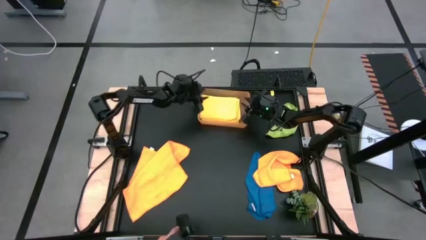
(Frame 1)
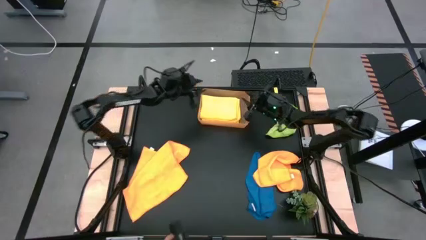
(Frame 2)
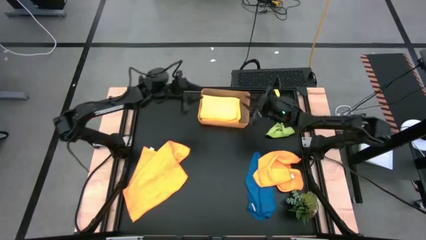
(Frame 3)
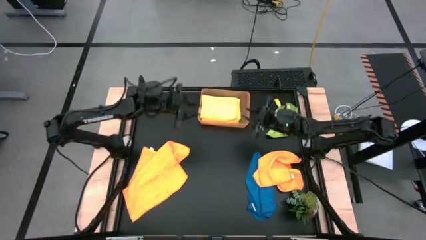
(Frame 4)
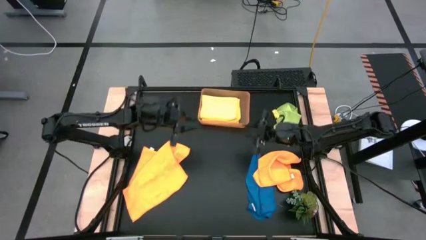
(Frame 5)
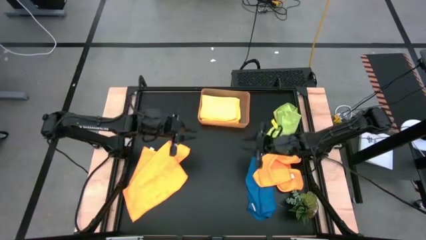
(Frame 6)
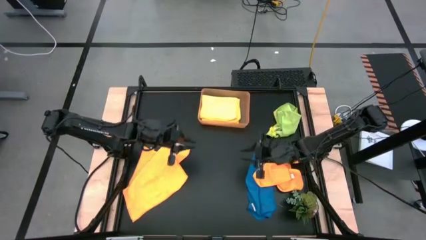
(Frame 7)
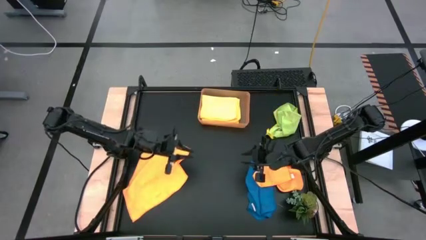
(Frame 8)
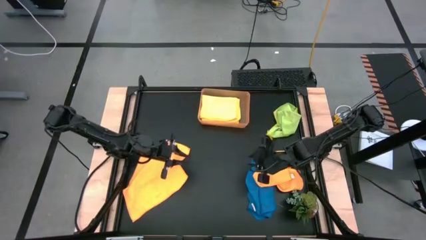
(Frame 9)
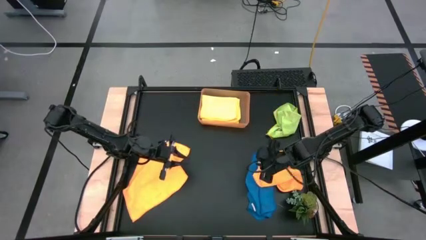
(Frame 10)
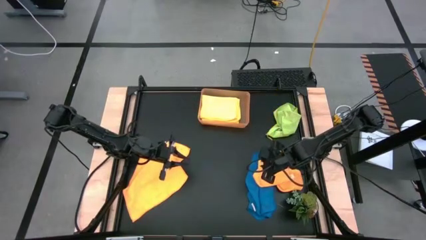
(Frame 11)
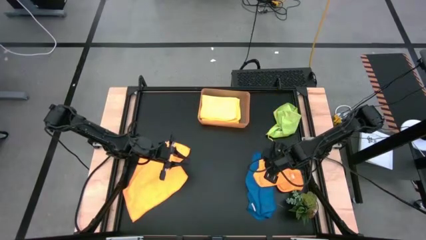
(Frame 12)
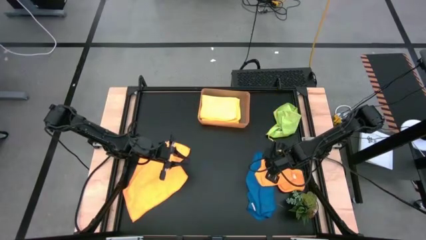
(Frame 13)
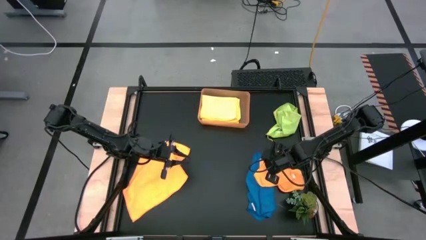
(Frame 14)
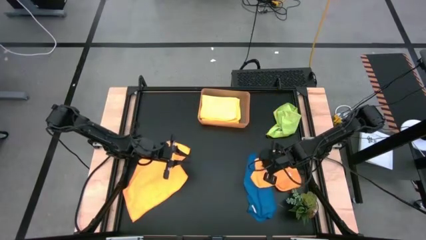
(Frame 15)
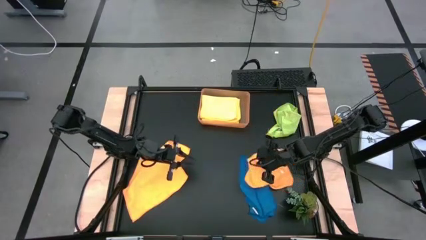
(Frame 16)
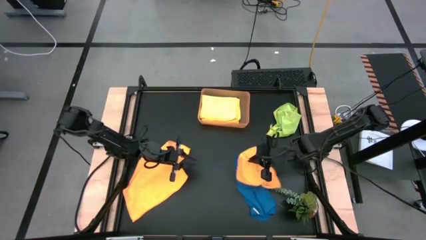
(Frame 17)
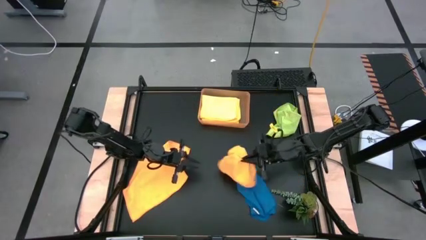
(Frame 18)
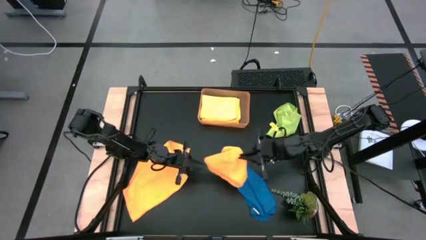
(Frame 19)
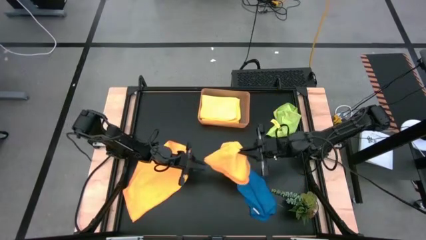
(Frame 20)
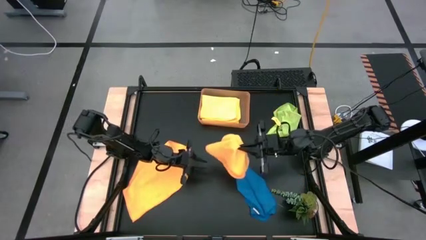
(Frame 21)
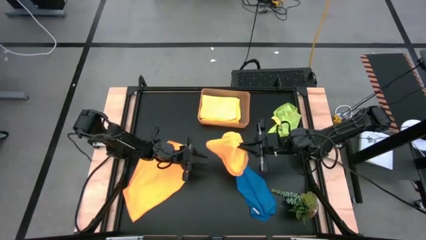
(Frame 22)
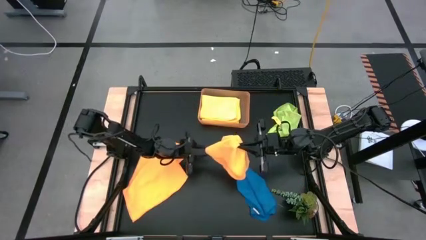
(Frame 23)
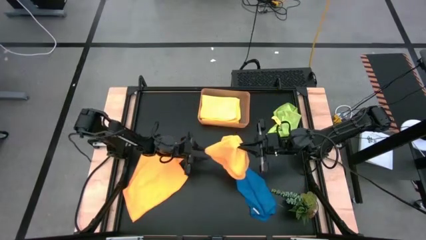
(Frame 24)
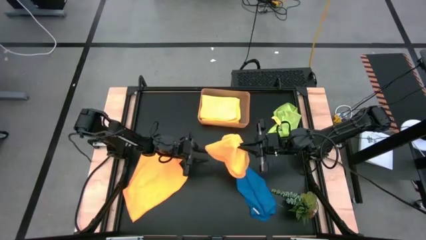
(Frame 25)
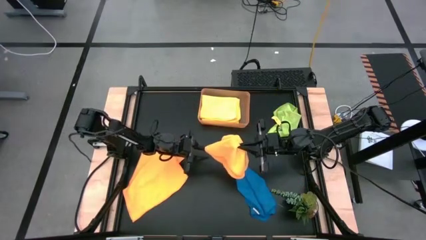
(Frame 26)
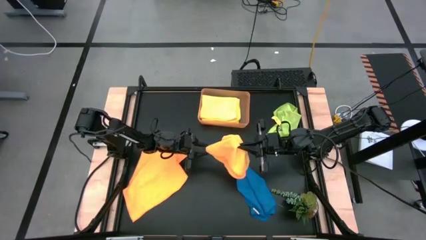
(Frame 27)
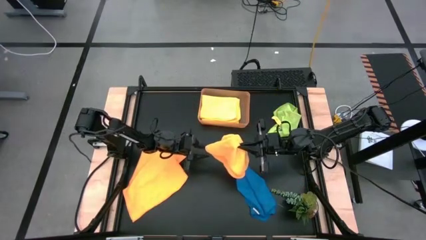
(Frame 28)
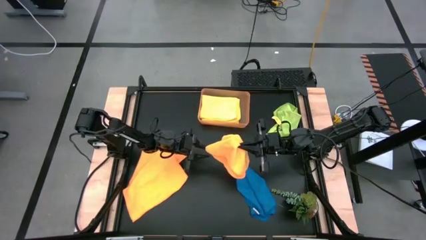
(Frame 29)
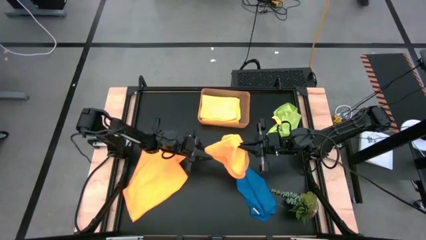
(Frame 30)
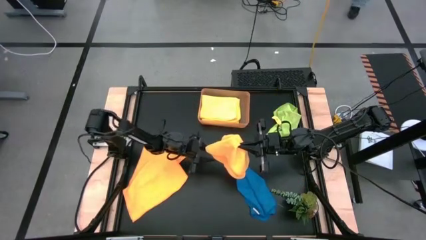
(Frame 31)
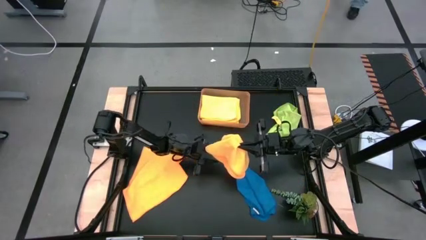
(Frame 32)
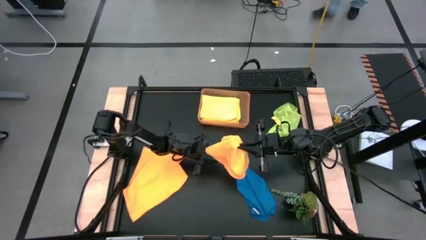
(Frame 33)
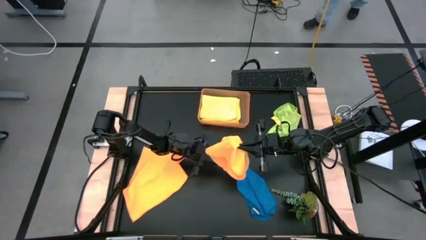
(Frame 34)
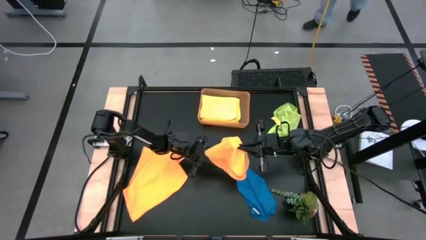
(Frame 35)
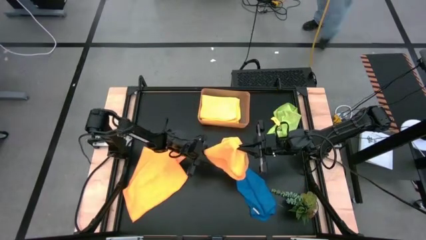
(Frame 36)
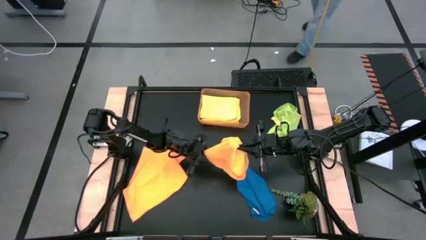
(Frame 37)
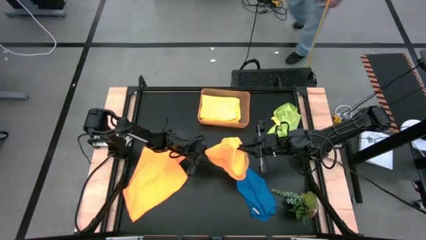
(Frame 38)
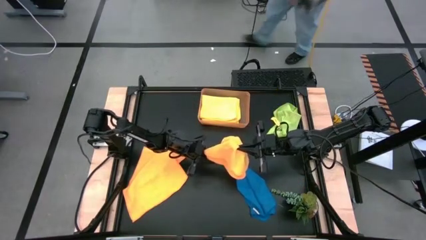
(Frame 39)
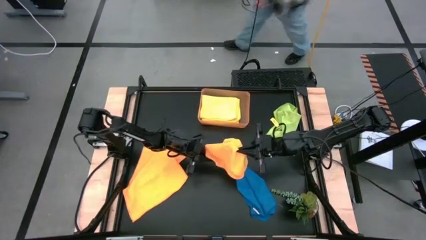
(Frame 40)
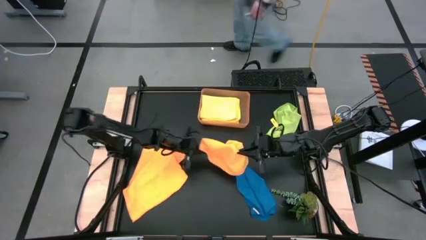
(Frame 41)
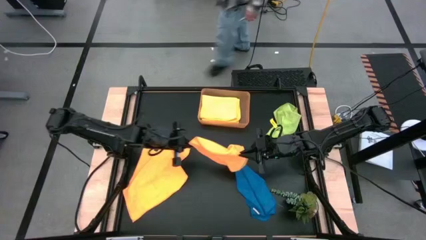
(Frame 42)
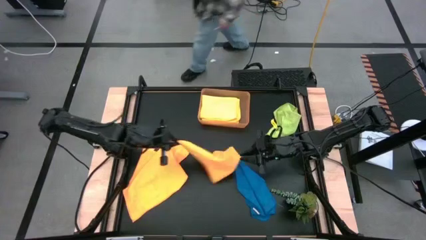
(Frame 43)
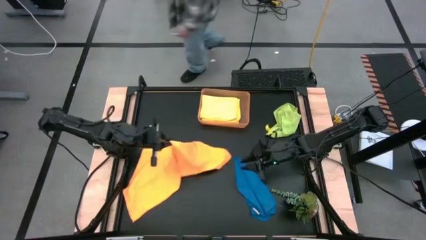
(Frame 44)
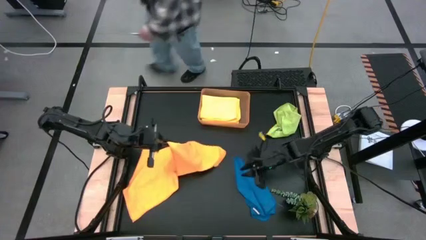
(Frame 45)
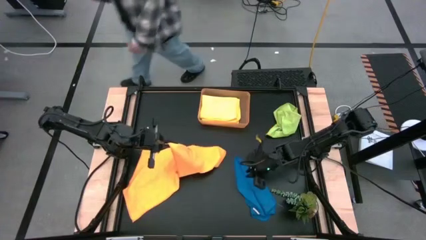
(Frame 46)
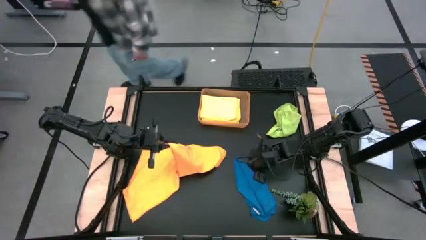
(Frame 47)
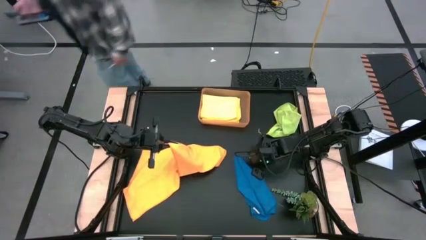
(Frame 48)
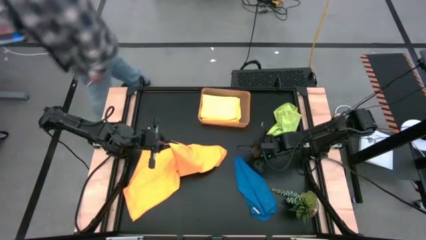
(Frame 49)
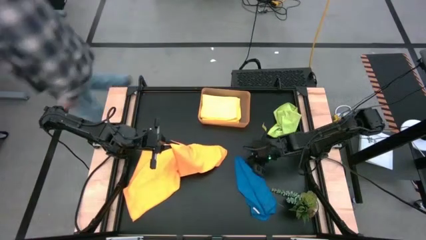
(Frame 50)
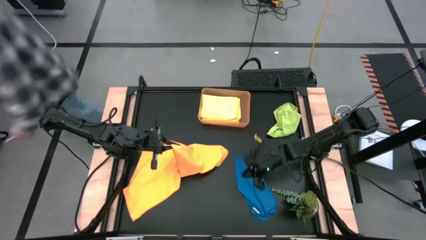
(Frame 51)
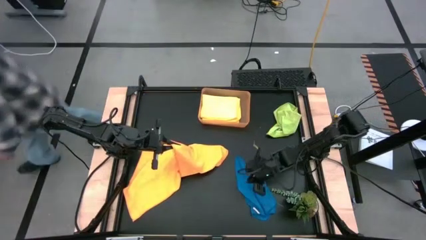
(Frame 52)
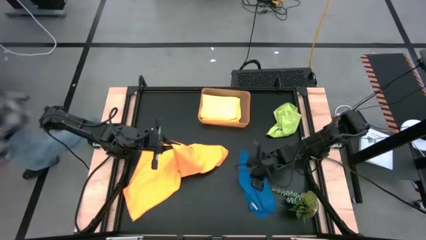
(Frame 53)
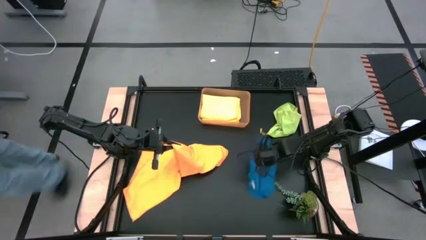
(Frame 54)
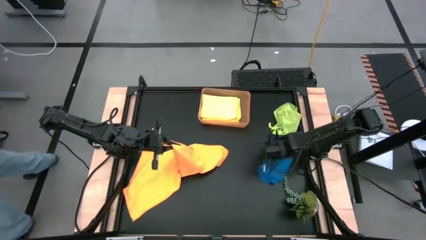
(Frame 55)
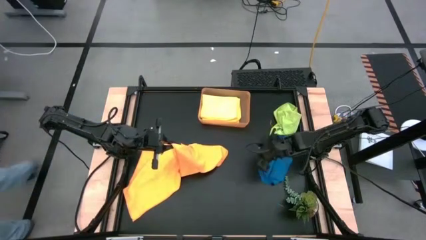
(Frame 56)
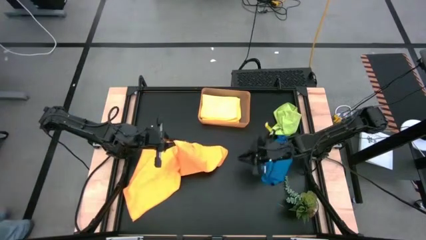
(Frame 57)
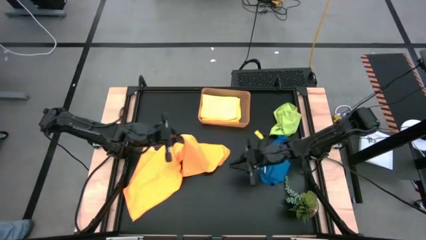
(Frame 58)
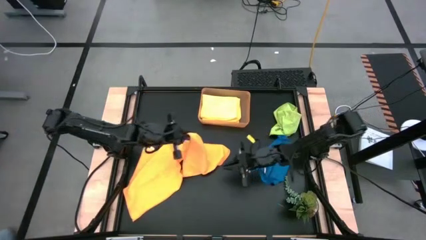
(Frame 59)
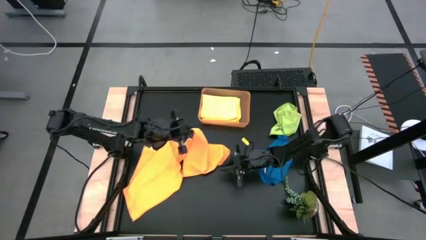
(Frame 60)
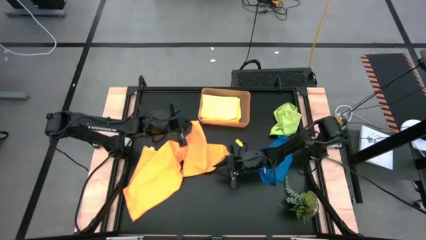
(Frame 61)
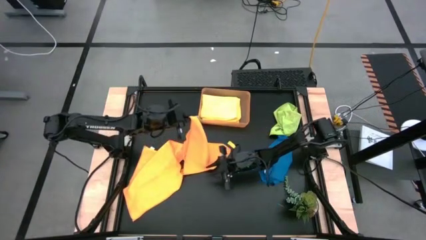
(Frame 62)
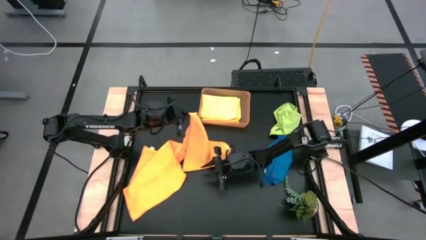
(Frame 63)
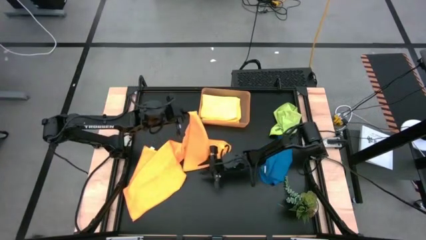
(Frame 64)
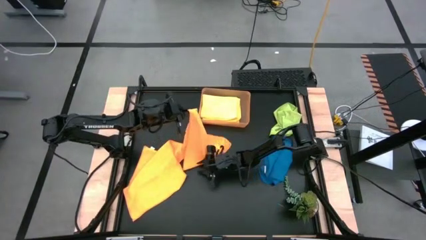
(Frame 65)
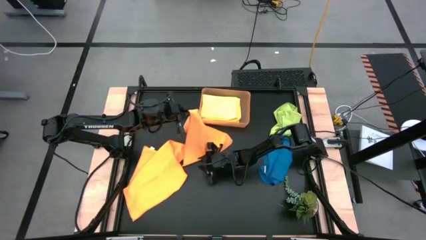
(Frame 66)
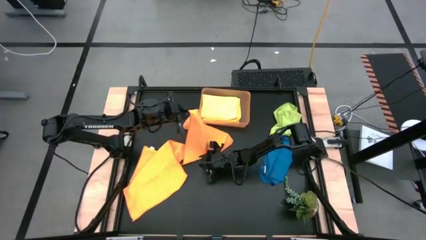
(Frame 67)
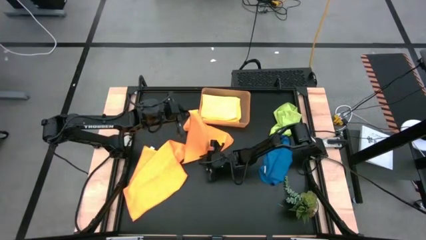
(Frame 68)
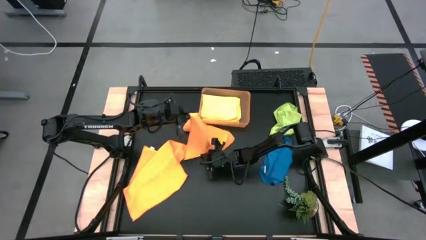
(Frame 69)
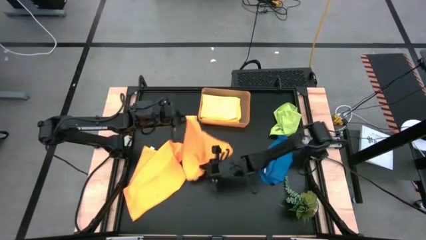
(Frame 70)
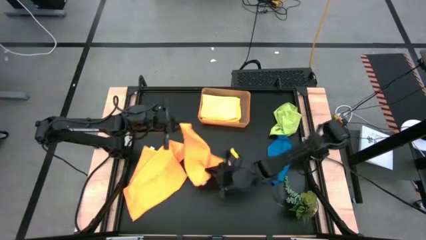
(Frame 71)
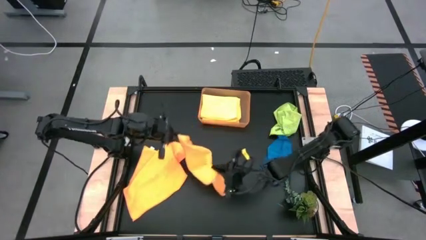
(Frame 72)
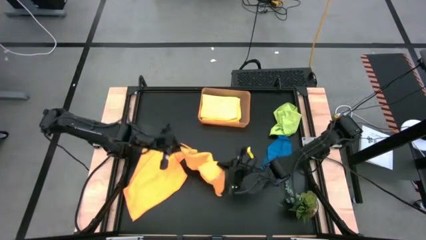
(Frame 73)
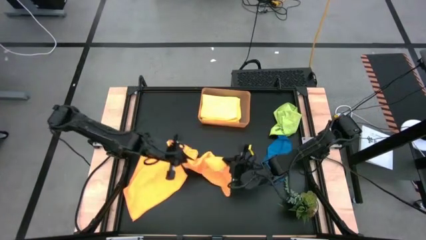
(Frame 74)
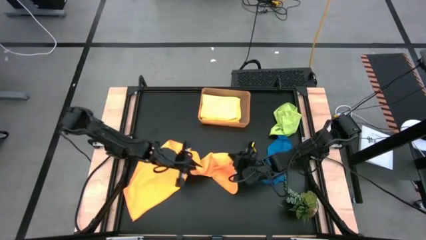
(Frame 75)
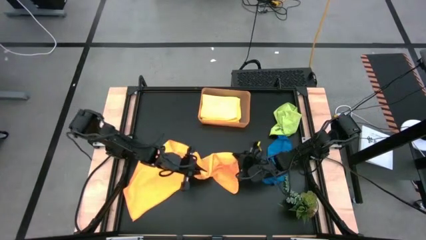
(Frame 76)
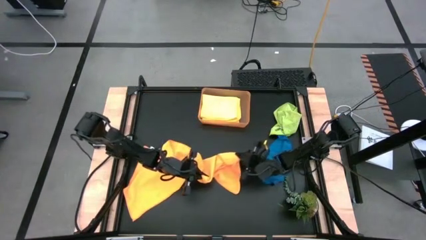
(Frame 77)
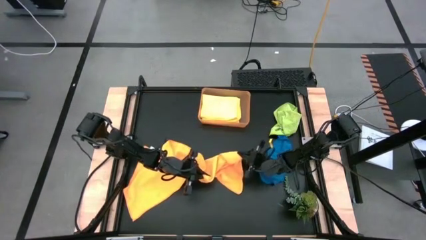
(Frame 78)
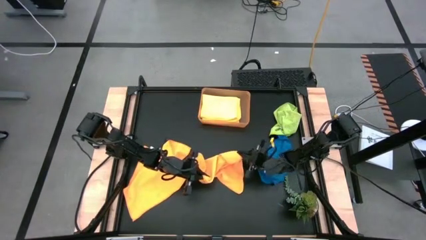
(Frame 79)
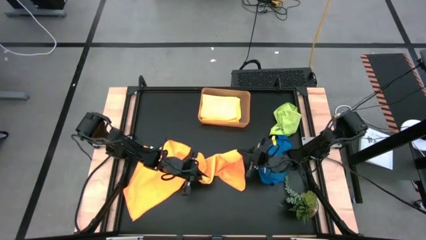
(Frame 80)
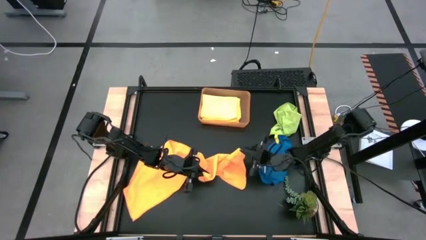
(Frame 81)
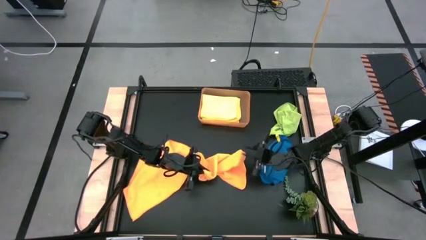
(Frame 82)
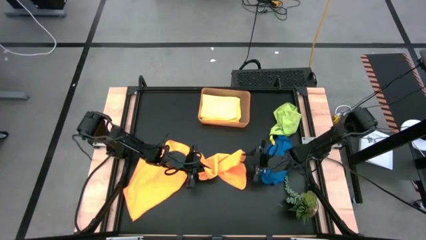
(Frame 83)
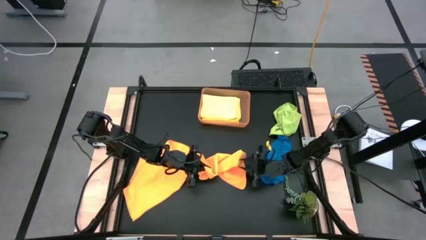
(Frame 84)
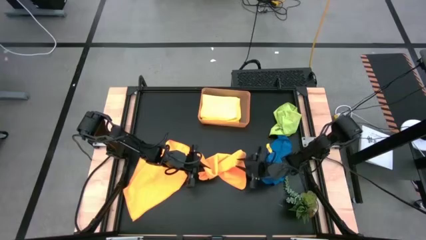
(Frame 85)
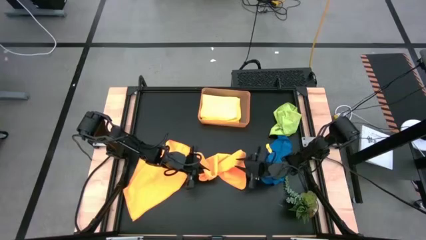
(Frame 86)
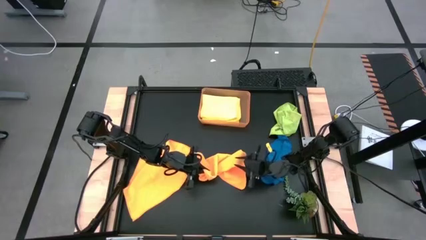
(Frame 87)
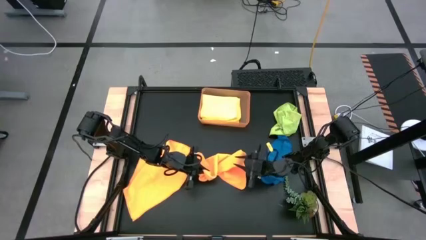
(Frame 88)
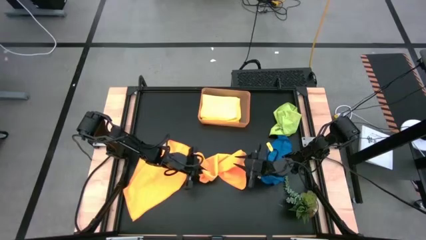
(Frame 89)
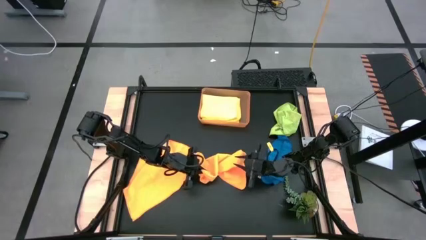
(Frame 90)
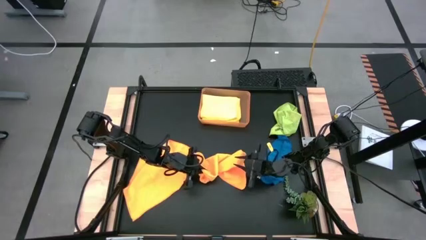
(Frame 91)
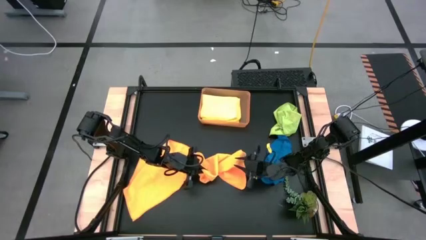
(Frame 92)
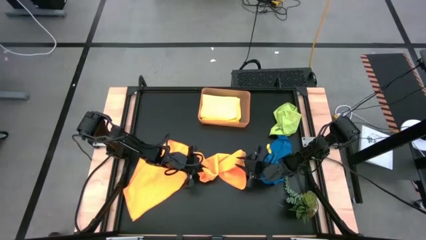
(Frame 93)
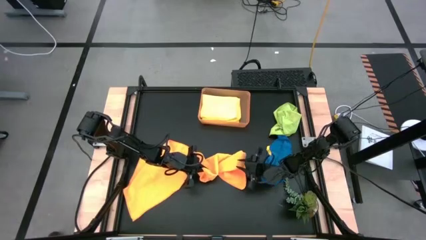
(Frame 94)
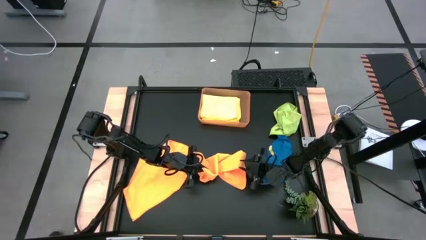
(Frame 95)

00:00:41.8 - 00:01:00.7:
Task: Fold microfiber towels
Fold the right orange towel
